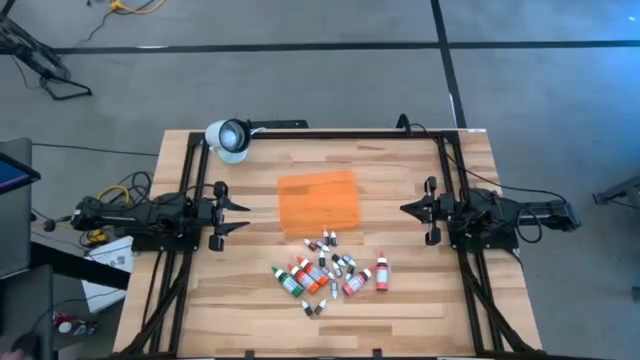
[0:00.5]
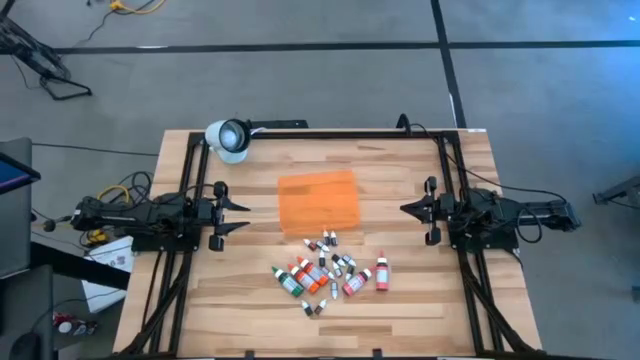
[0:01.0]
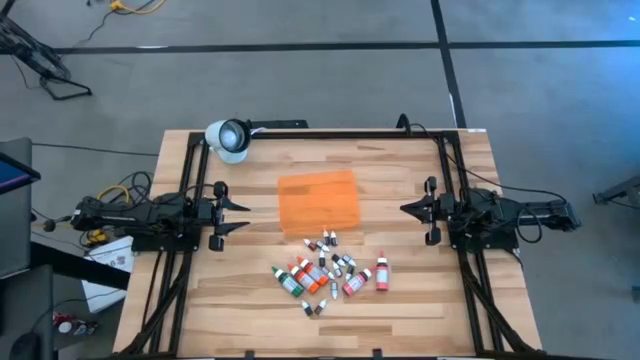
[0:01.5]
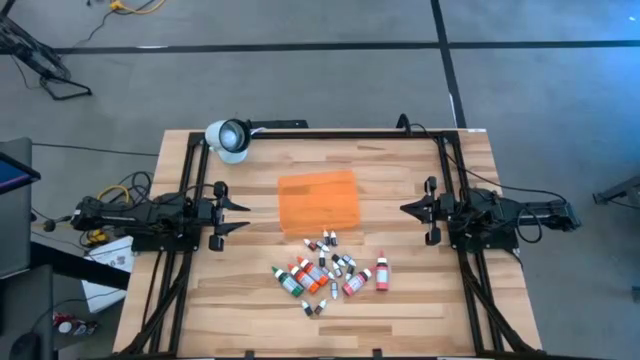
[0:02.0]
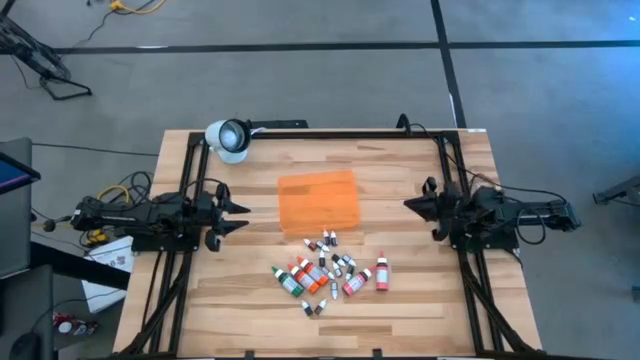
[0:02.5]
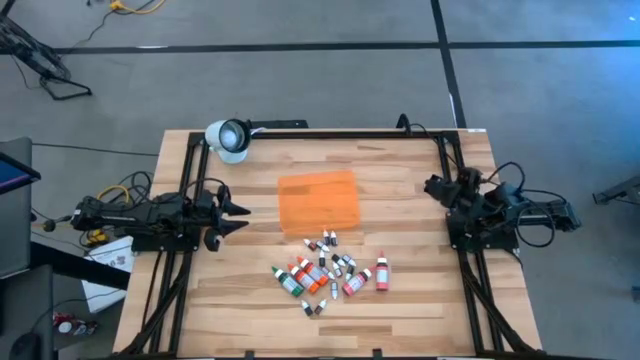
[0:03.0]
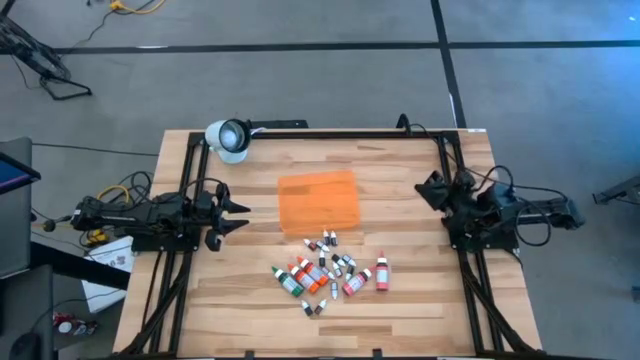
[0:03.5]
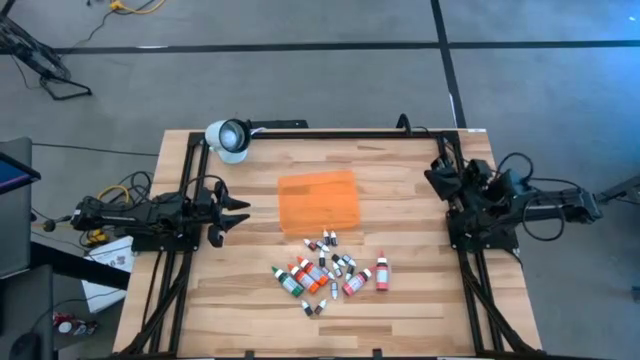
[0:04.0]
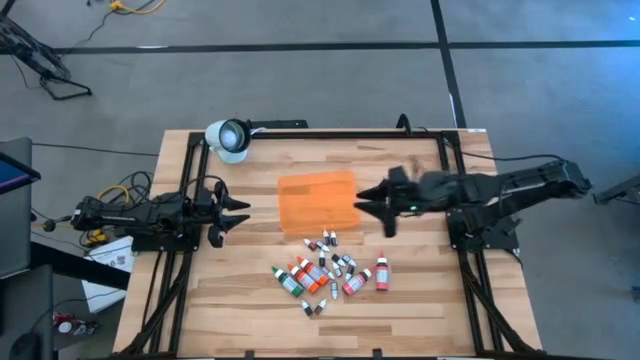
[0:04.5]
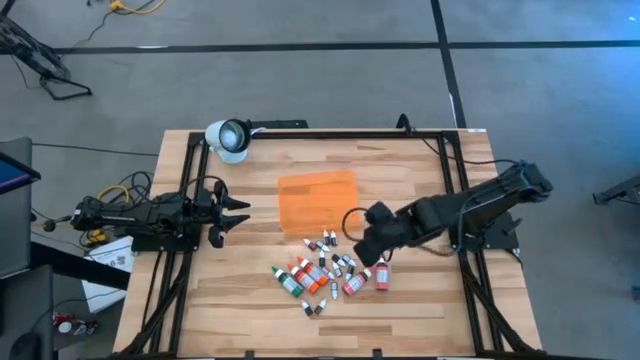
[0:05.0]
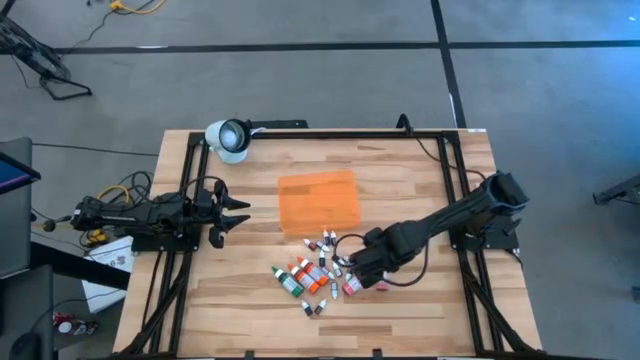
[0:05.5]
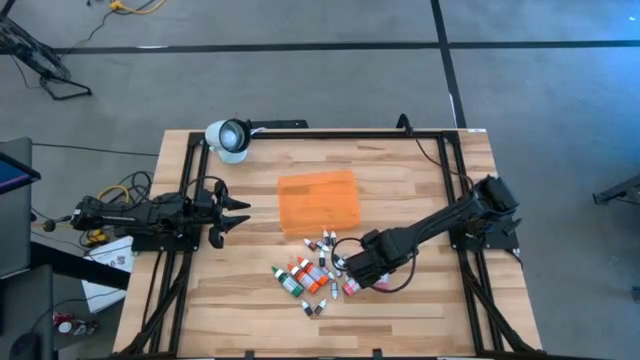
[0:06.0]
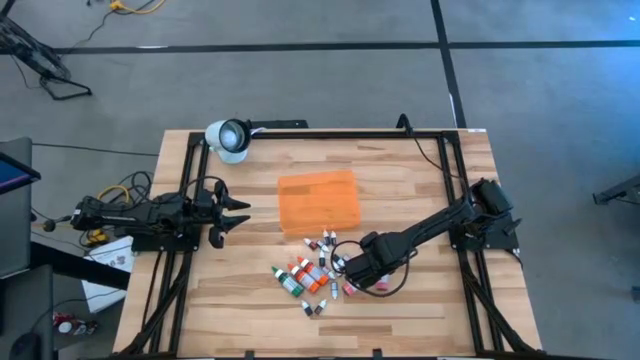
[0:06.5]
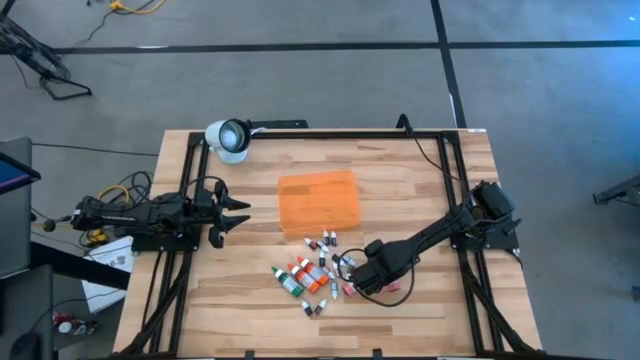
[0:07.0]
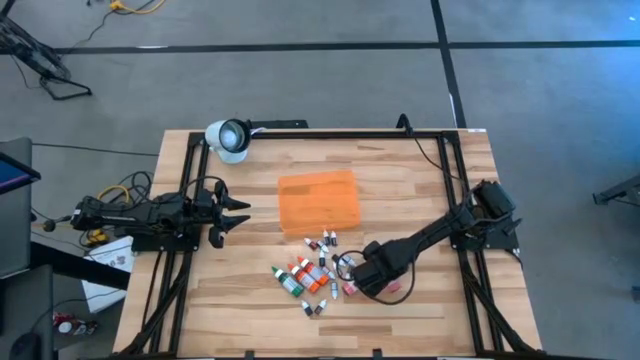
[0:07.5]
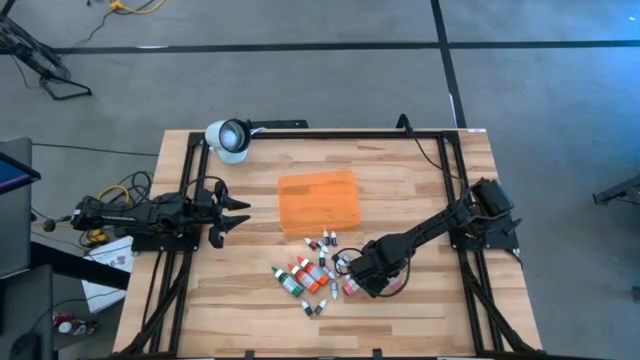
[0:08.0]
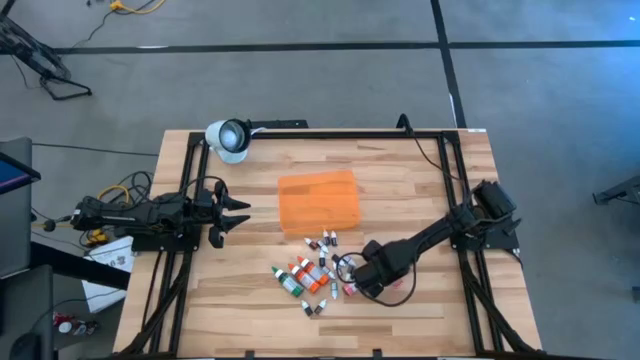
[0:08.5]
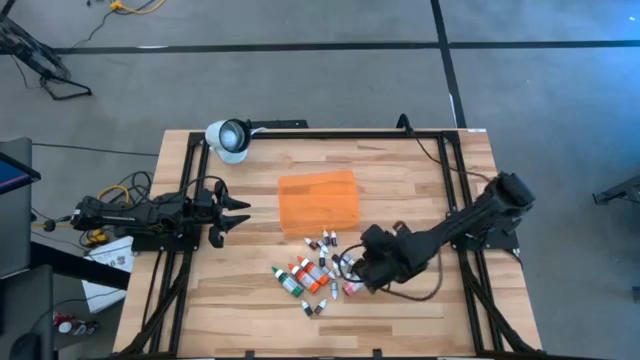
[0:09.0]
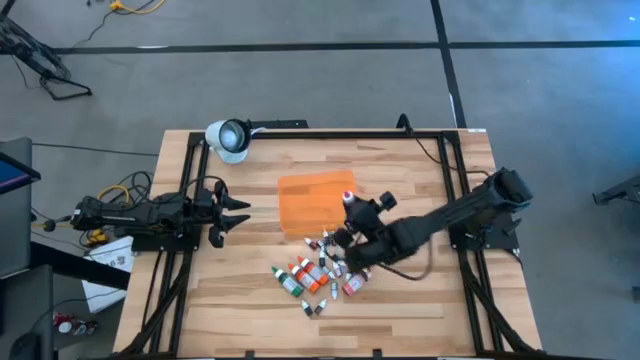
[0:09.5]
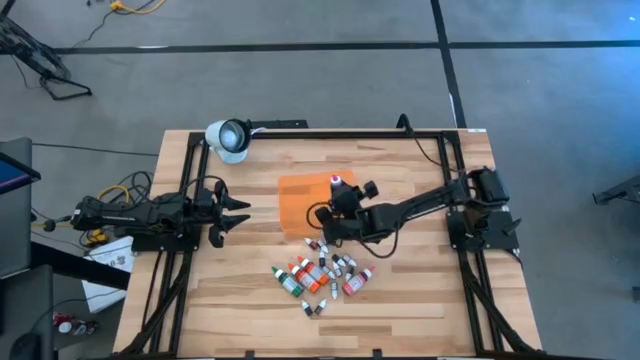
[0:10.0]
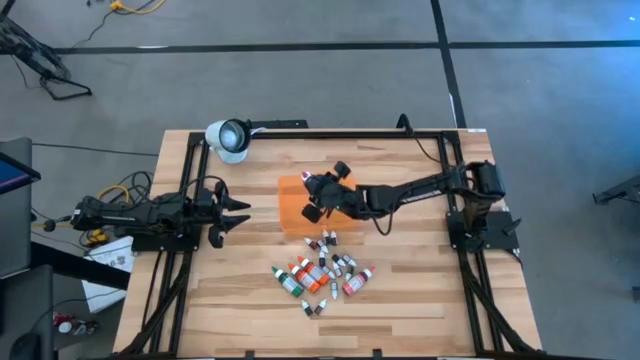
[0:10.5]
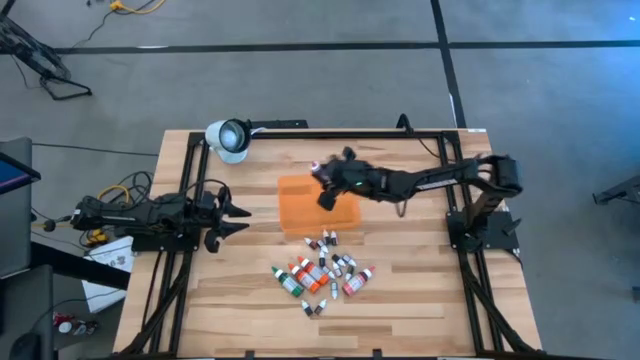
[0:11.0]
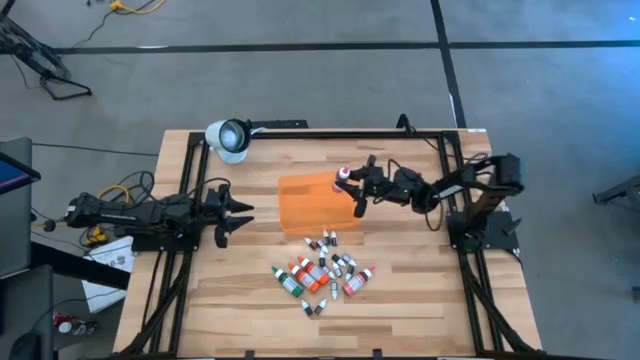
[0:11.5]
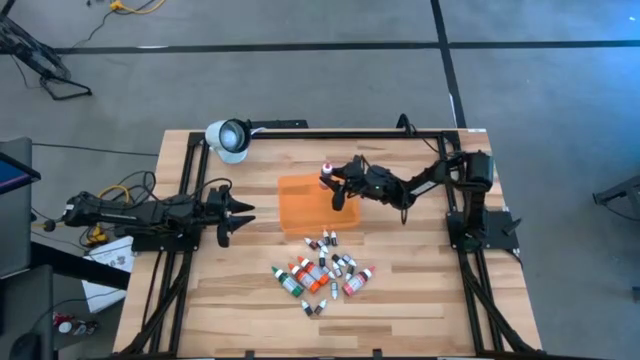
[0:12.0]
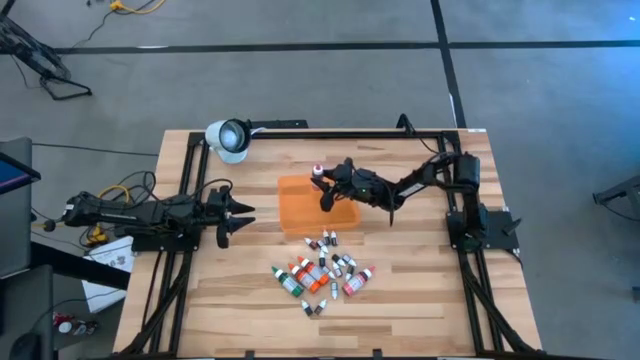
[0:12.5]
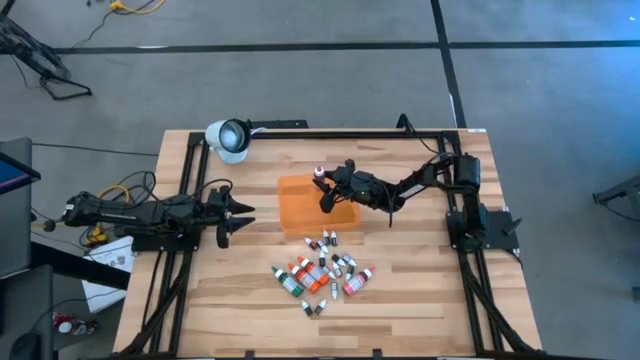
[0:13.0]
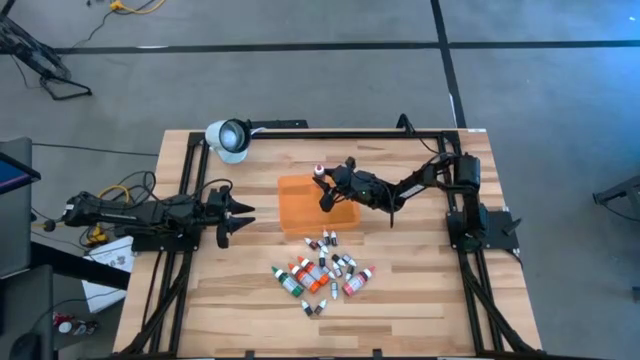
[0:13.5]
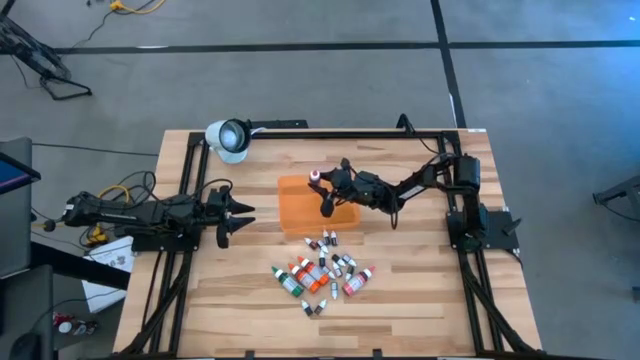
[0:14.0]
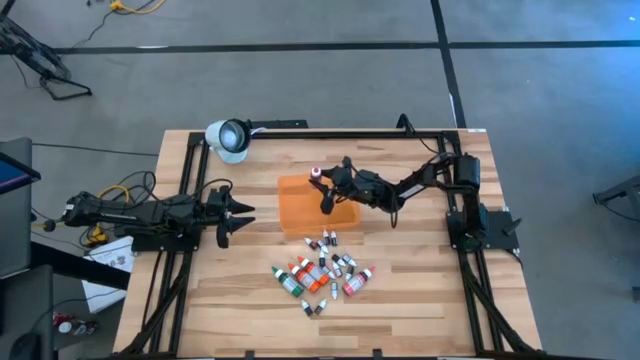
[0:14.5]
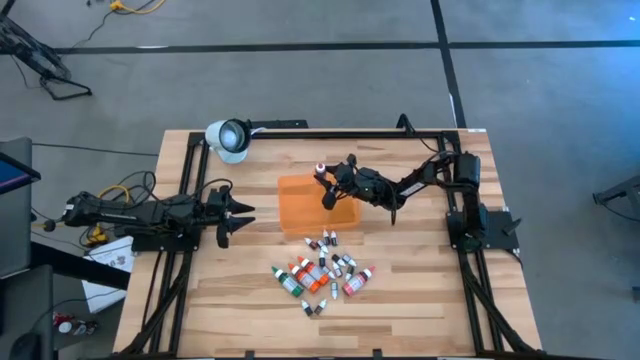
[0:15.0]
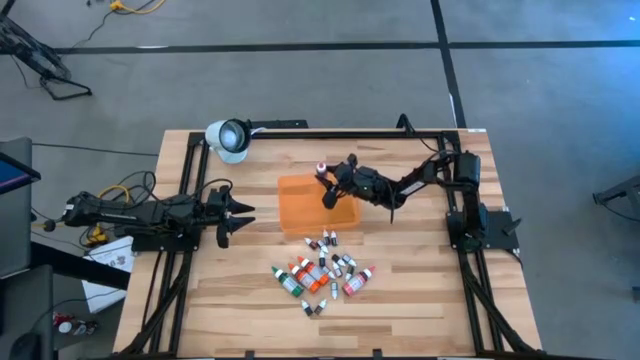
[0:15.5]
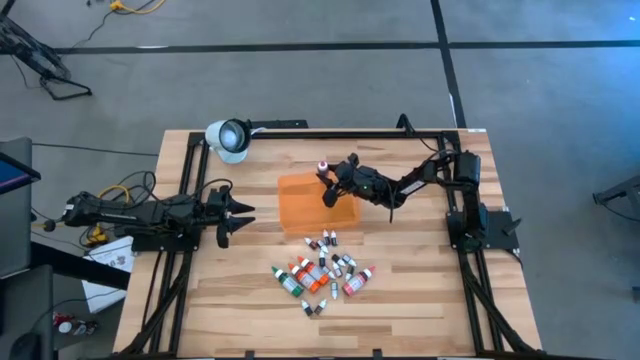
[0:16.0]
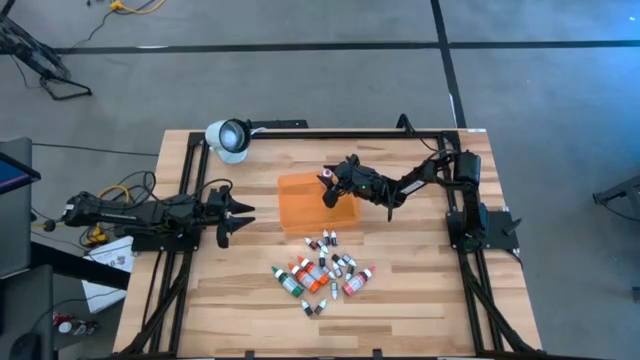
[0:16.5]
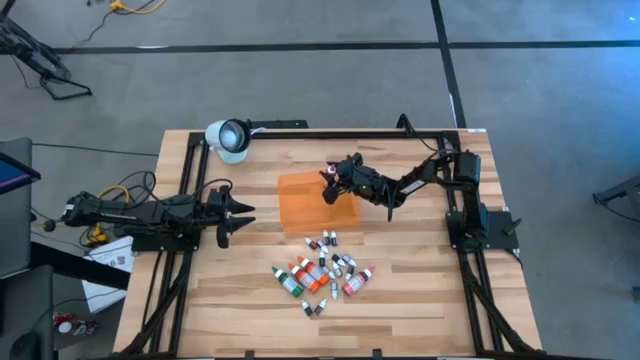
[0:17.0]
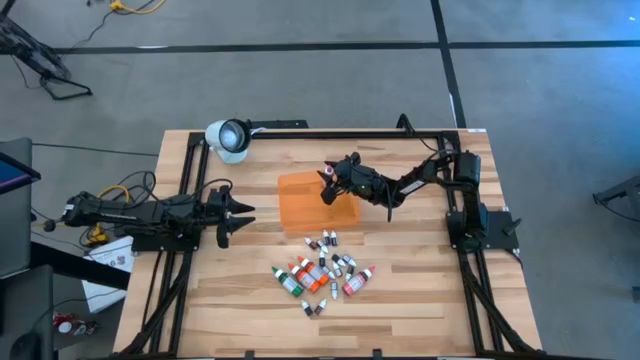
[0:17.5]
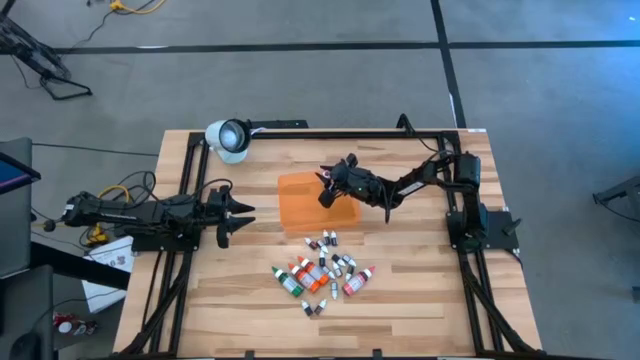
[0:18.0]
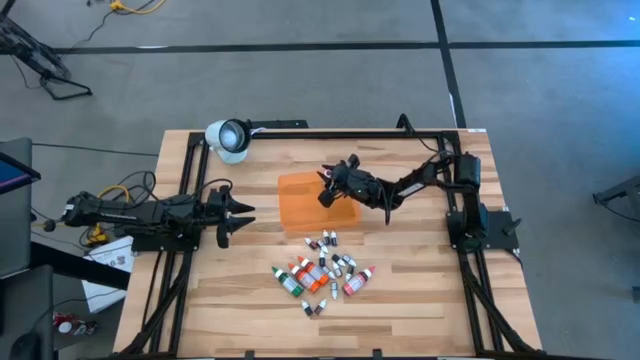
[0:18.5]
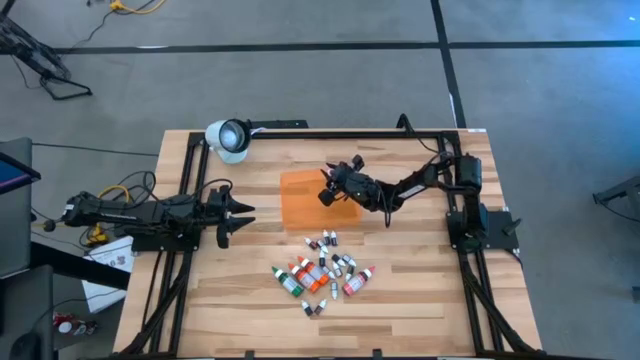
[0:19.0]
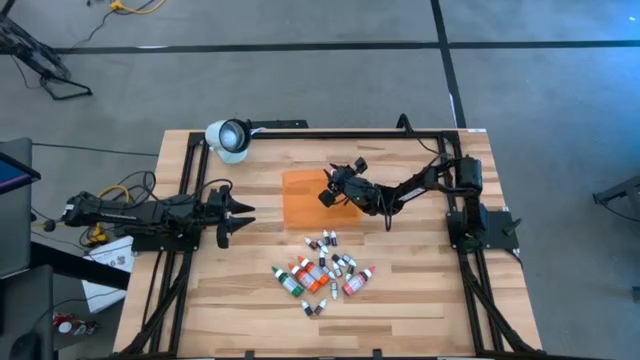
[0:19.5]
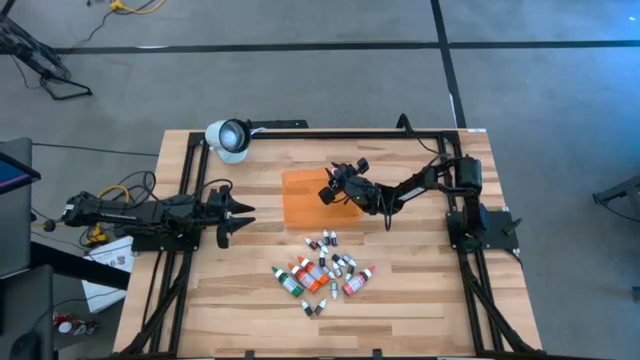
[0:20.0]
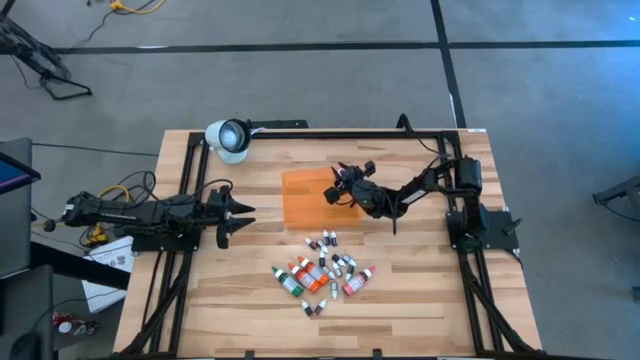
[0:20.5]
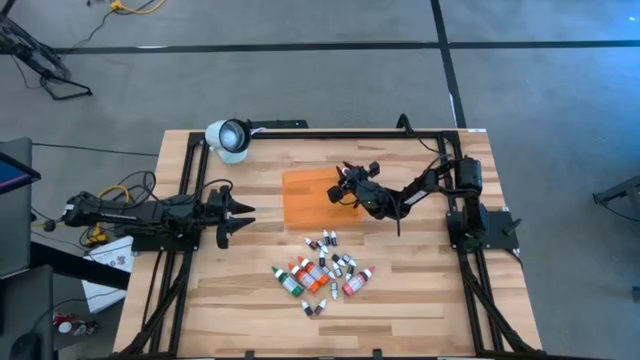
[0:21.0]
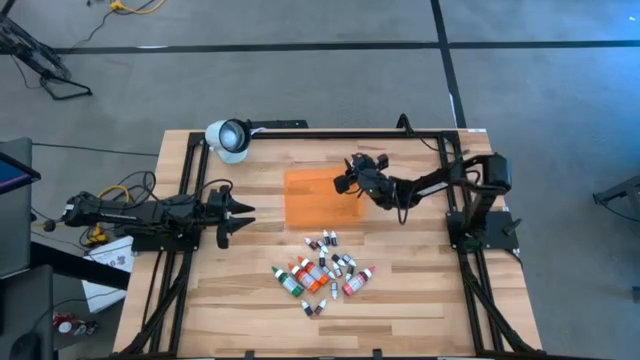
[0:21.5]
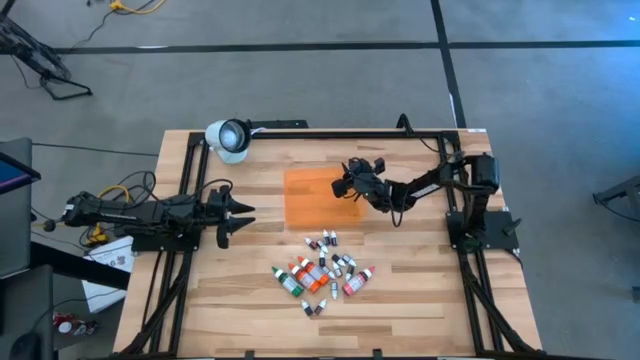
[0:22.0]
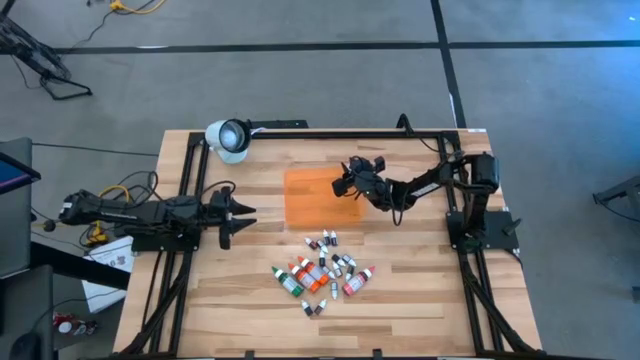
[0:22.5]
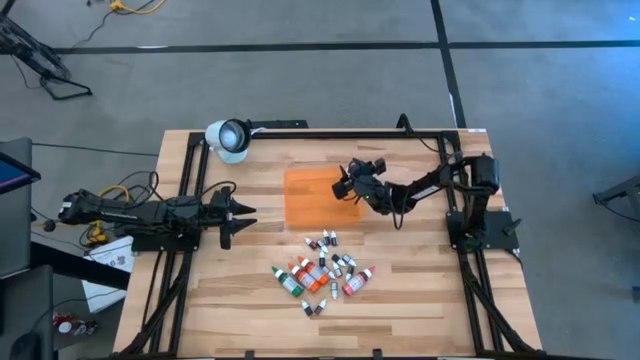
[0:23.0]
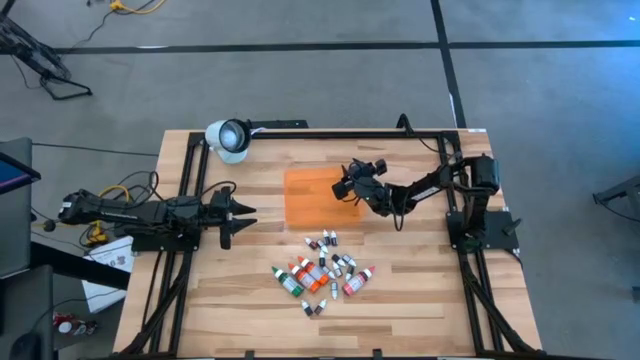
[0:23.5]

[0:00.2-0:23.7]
Task: Pick & Place food coloring
Put the big pink food coloring bottle into the orange bin
